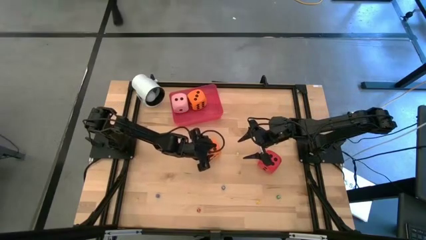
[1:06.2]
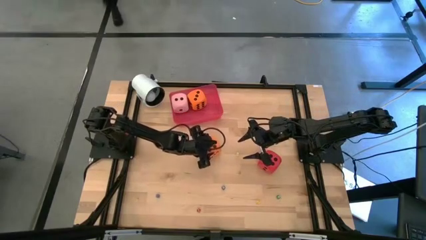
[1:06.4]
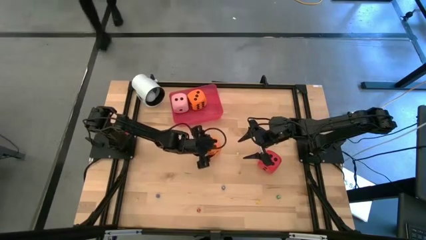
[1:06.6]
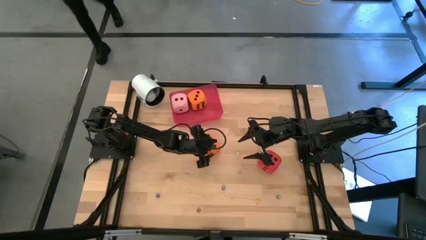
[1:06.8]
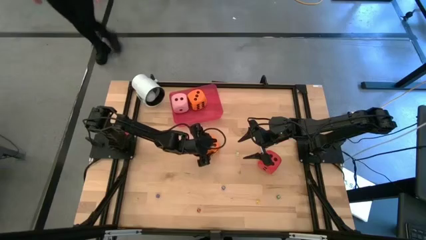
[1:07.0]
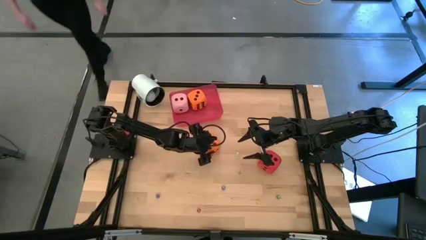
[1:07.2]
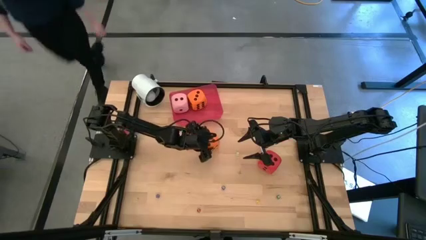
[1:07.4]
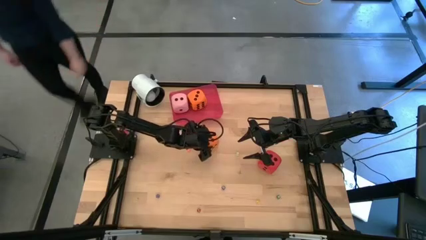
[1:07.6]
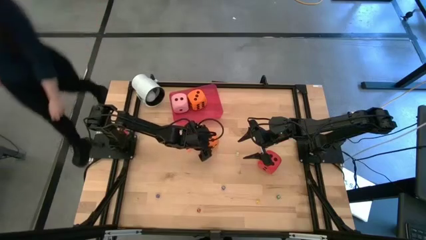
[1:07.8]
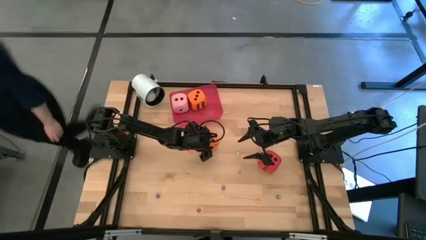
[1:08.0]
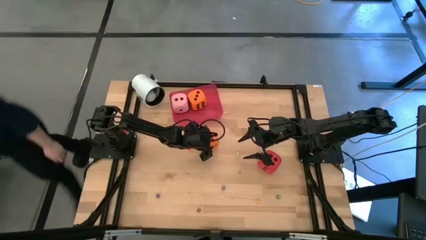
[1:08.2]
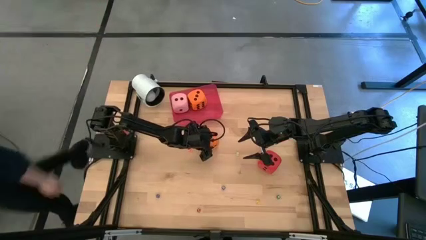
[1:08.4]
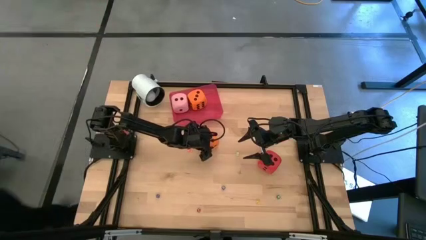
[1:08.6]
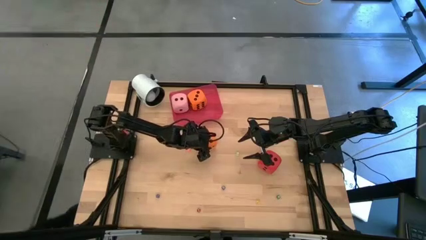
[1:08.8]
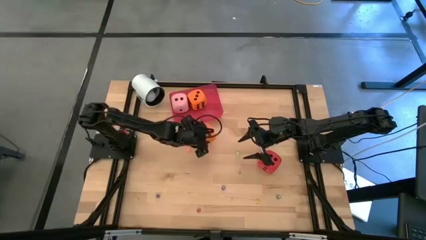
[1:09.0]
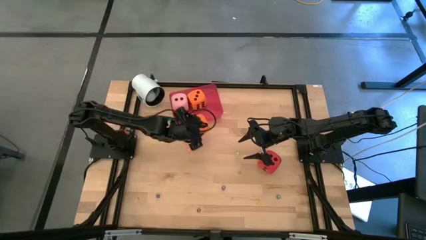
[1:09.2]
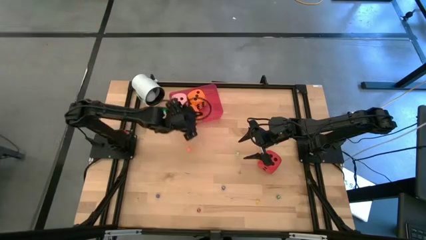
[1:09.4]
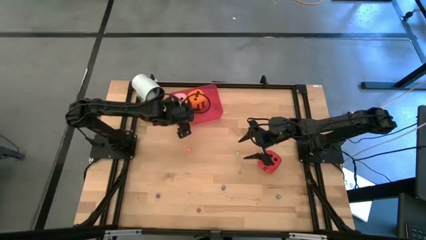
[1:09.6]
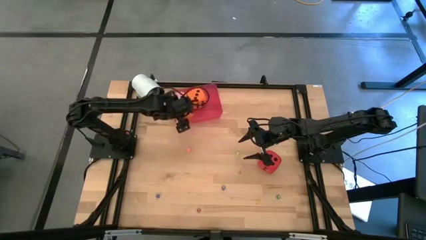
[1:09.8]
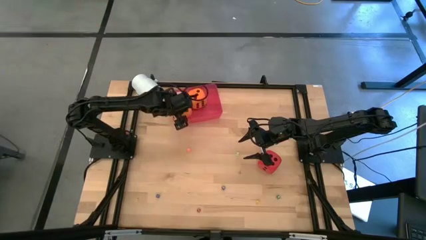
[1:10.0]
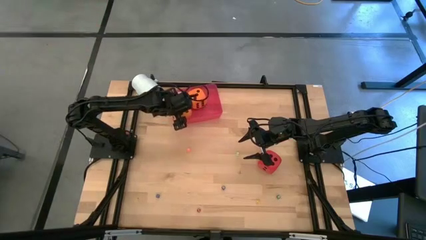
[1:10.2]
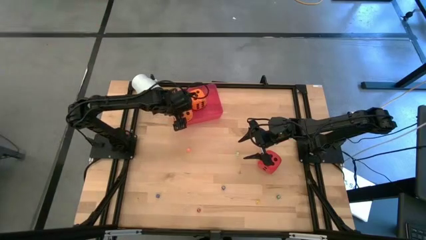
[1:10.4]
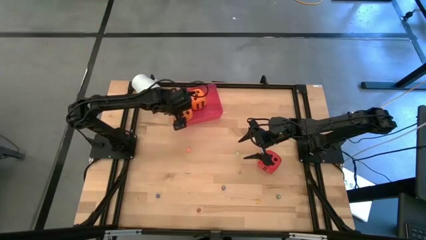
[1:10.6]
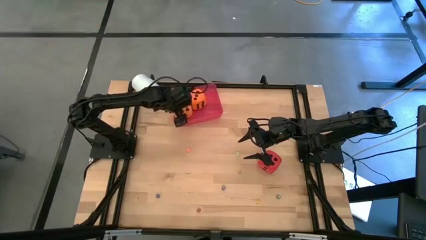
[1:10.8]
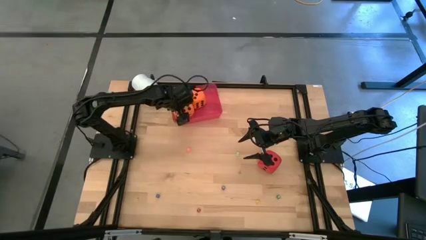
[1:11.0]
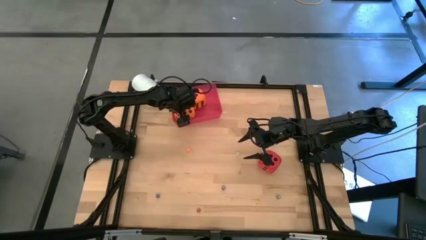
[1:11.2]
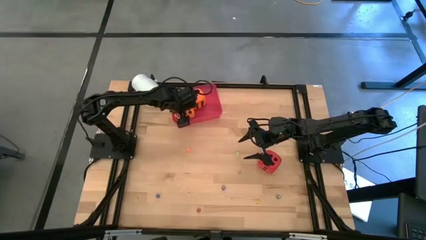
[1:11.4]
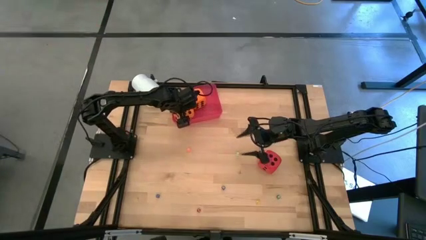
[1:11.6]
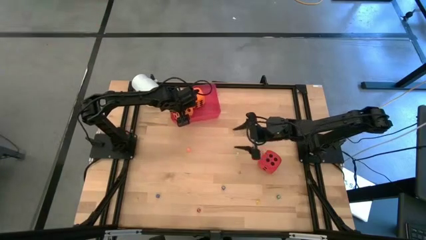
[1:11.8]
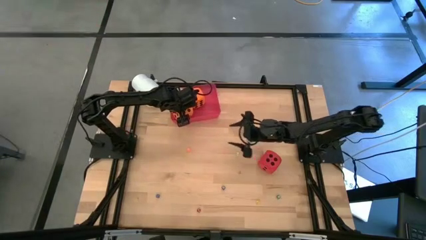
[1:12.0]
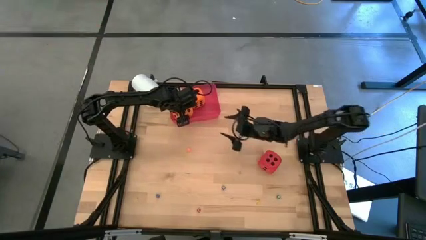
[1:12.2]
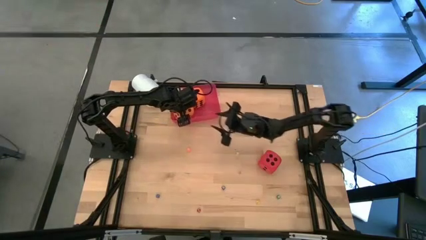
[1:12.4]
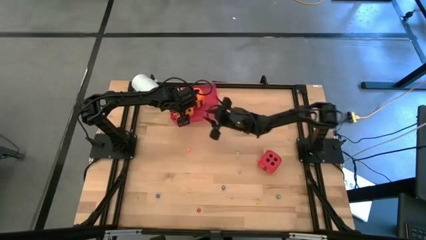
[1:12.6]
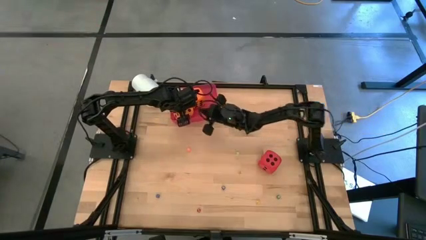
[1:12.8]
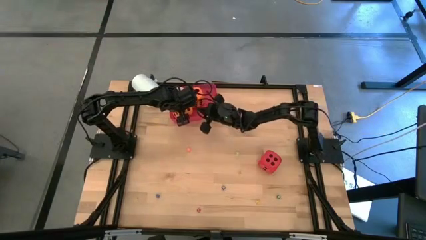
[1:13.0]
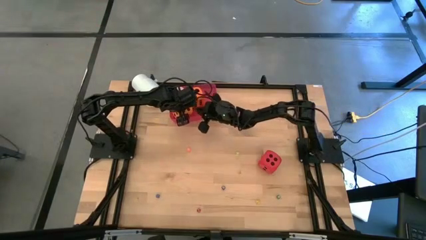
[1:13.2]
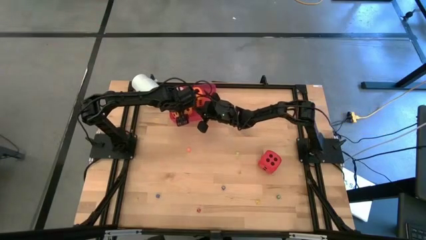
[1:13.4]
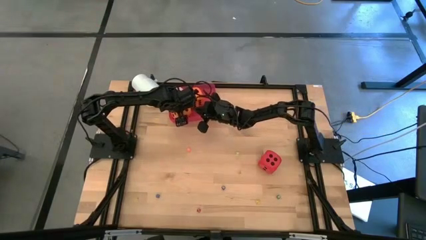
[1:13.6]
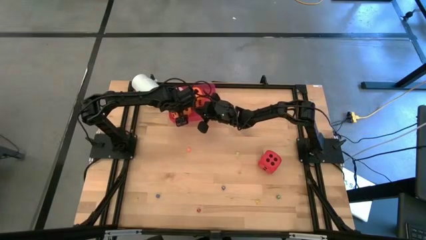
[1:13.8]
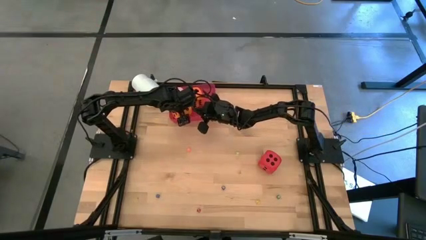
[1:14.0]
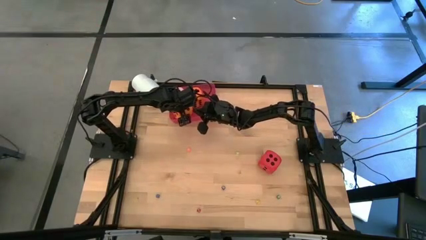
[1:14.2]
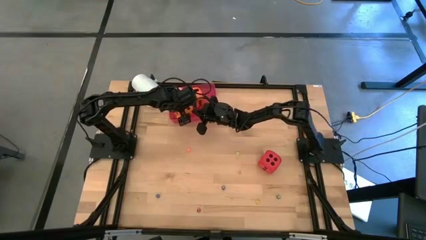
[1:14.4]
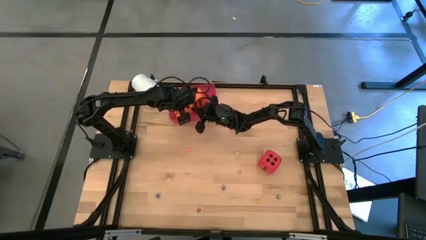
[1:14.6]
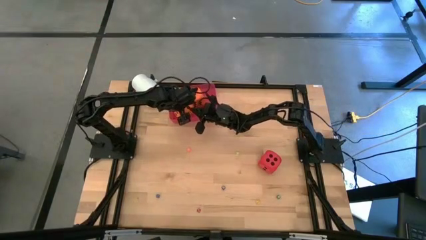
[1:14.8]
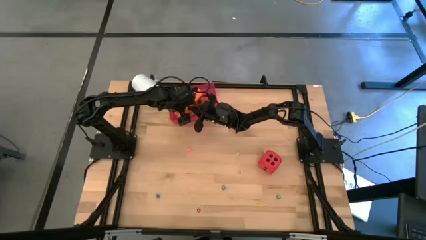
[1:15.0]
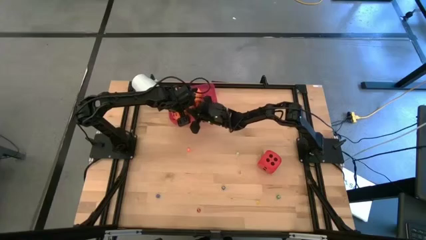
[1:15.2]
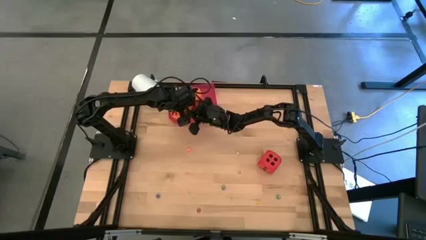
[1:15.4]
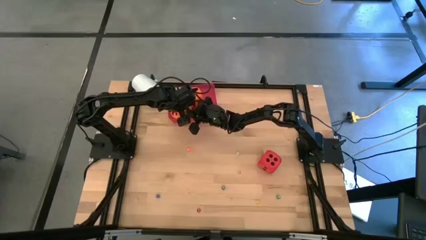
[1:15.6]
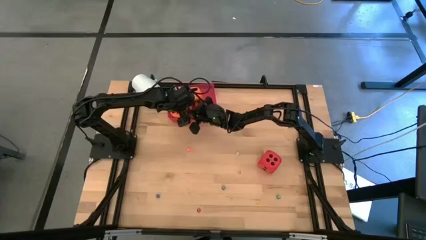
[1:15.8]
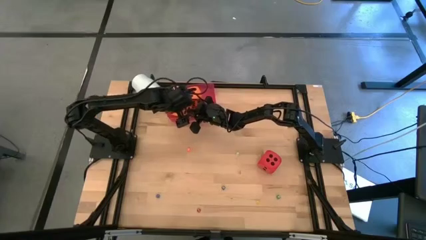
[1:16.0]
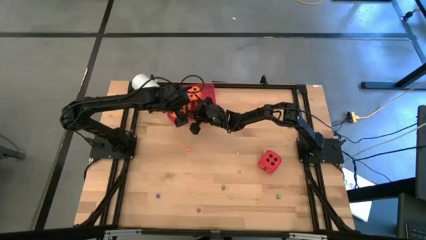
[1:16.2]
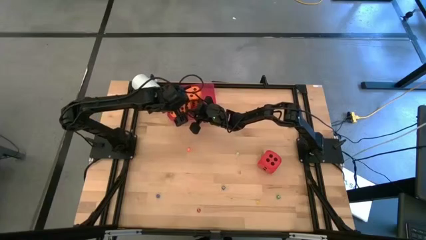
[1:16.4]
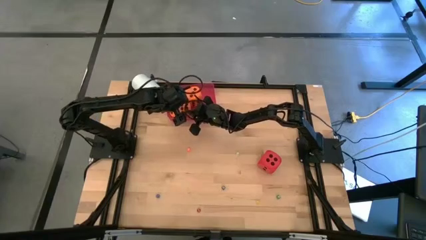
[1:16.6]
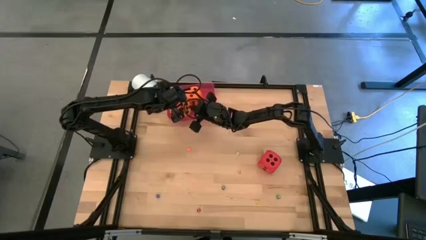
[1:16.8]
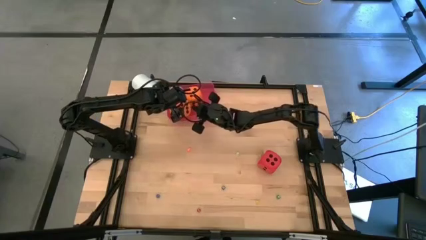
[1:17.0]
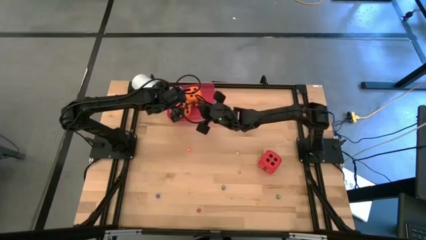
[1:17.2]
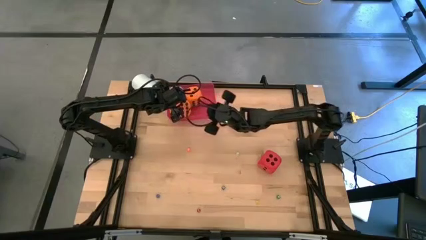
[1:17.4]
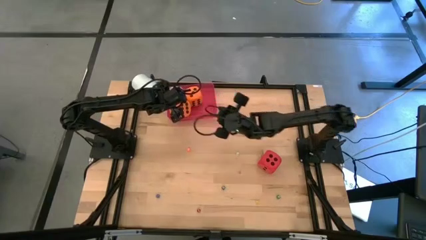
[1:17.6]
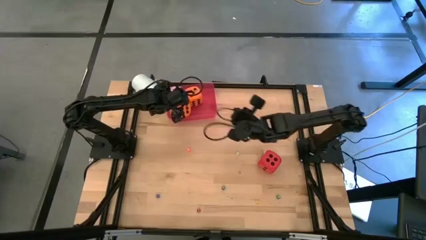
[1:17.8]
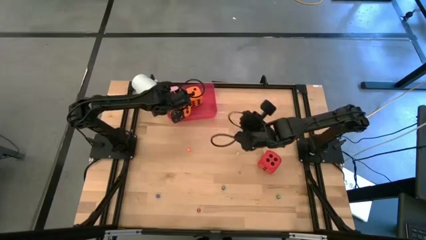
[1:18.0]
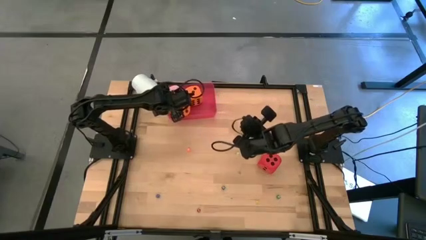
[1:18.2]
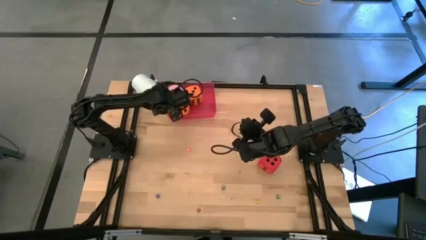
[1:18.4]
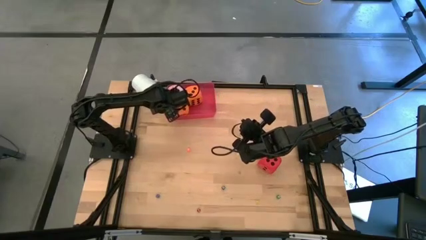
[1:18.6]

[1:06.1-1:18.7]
Task: Pick & Place Dice
Put the large orange die into the red bin
